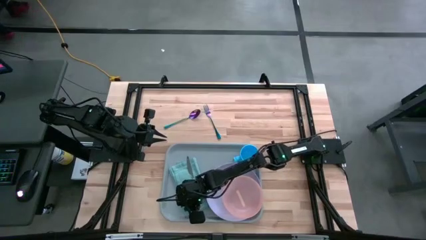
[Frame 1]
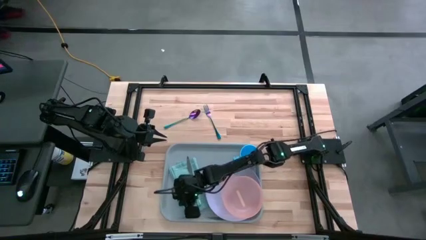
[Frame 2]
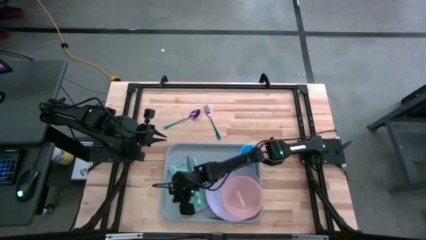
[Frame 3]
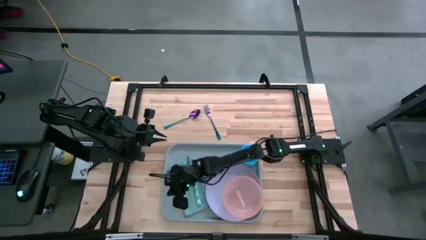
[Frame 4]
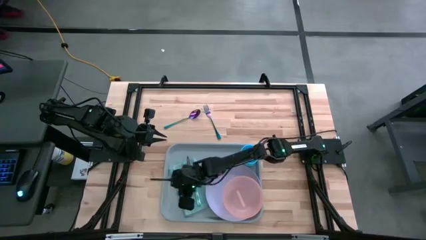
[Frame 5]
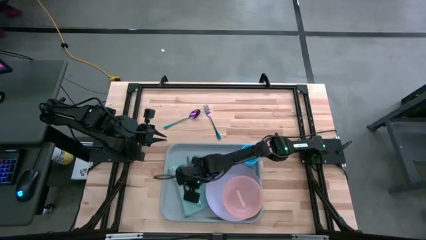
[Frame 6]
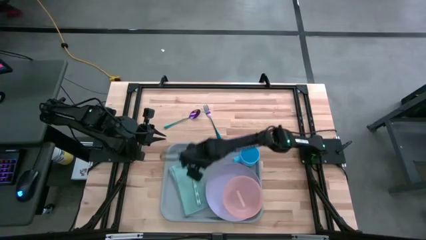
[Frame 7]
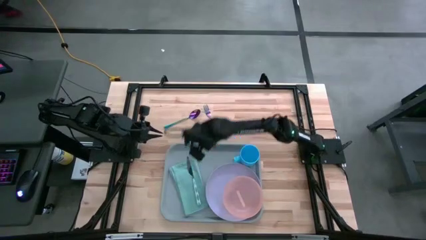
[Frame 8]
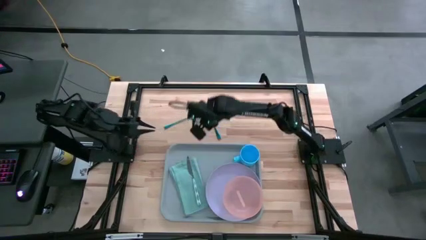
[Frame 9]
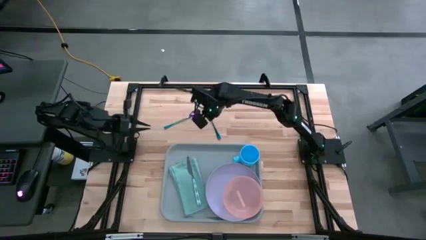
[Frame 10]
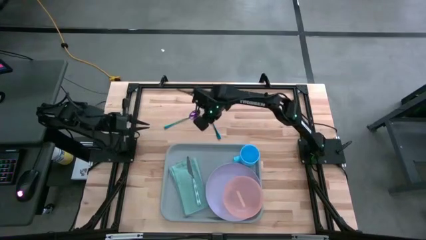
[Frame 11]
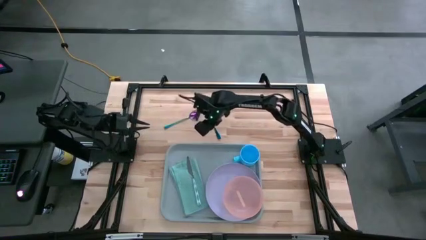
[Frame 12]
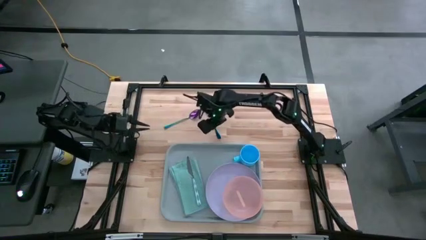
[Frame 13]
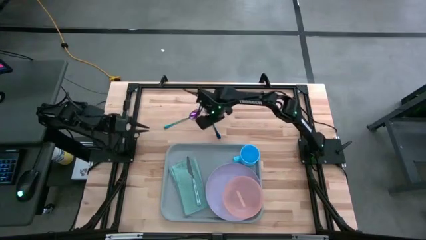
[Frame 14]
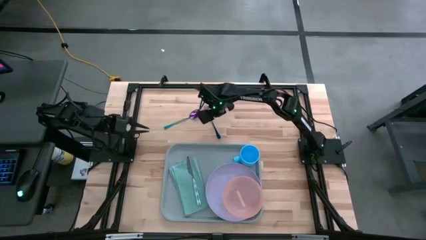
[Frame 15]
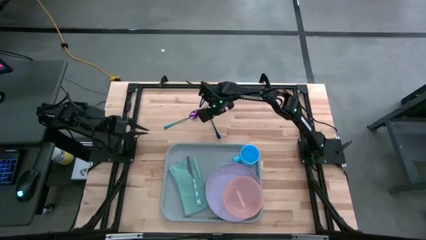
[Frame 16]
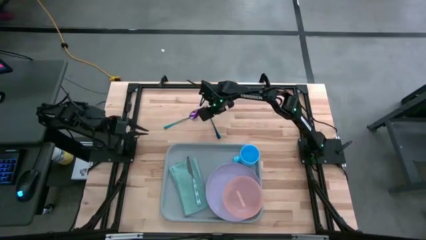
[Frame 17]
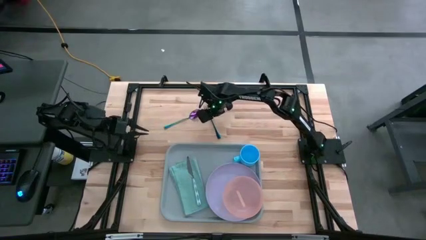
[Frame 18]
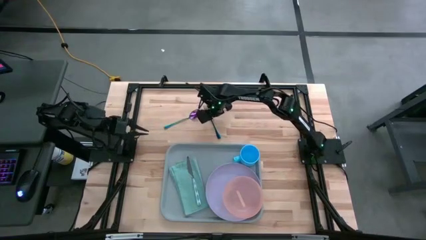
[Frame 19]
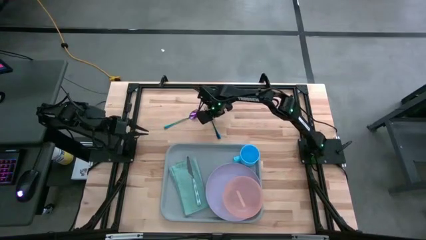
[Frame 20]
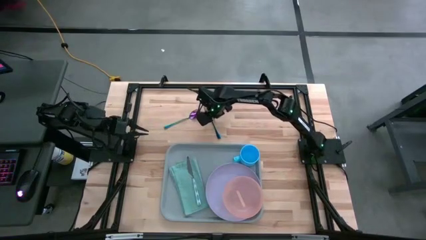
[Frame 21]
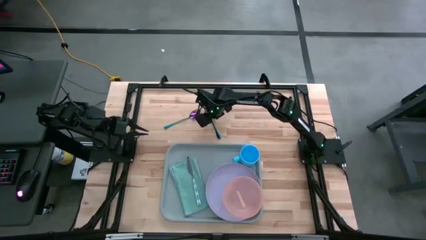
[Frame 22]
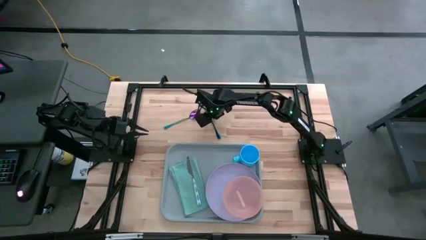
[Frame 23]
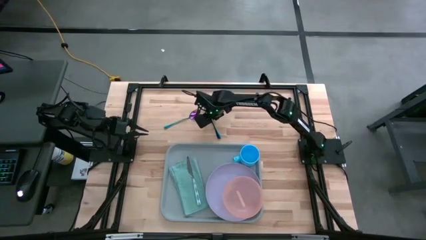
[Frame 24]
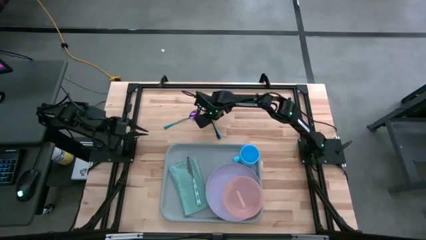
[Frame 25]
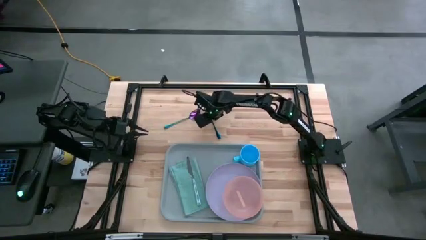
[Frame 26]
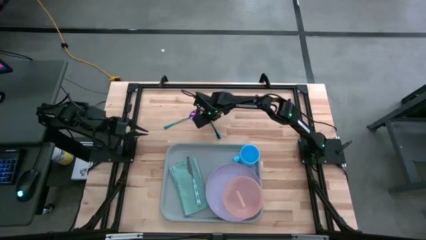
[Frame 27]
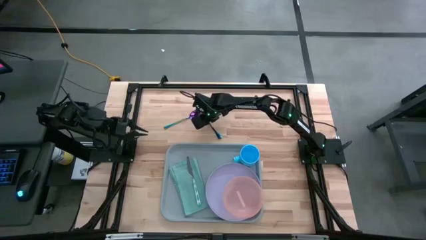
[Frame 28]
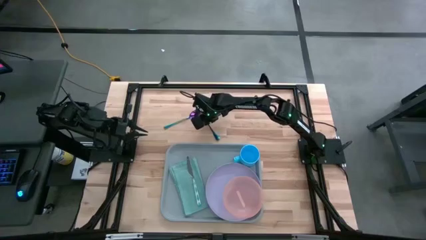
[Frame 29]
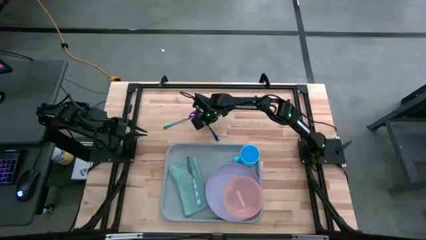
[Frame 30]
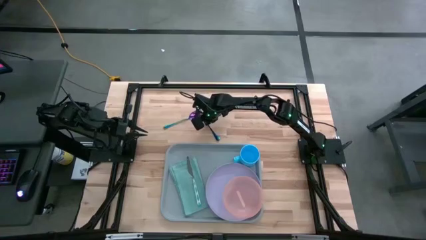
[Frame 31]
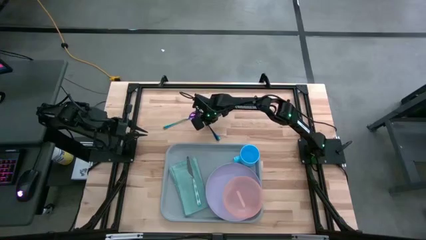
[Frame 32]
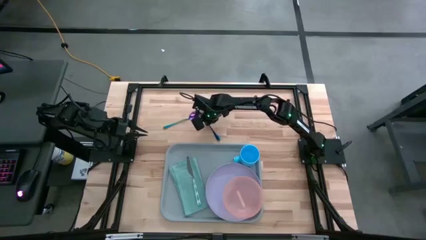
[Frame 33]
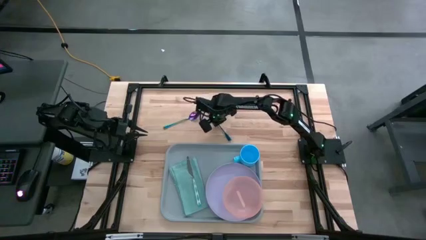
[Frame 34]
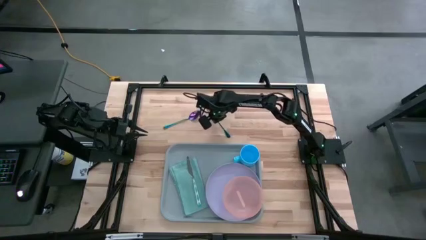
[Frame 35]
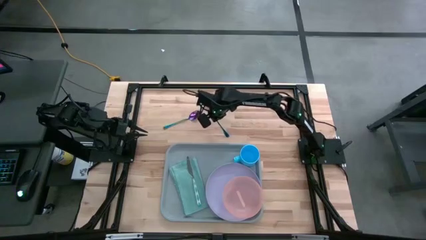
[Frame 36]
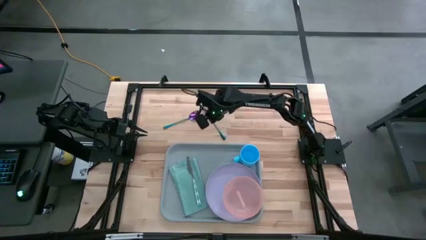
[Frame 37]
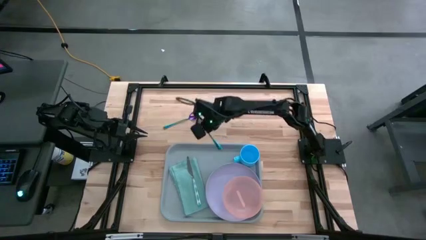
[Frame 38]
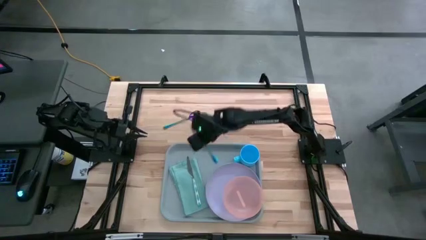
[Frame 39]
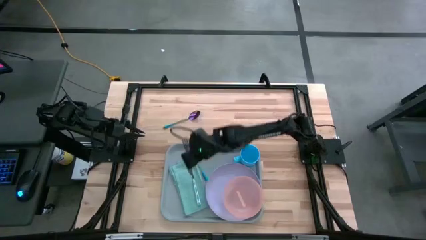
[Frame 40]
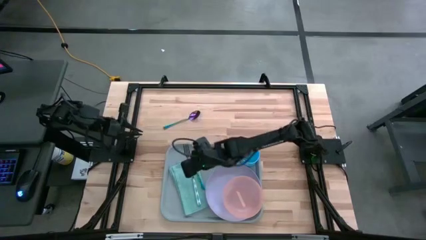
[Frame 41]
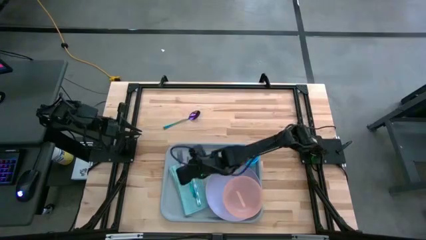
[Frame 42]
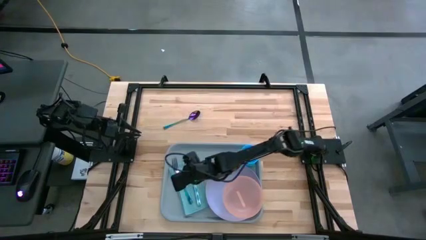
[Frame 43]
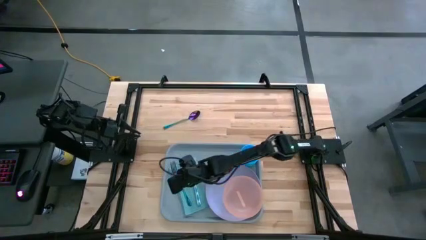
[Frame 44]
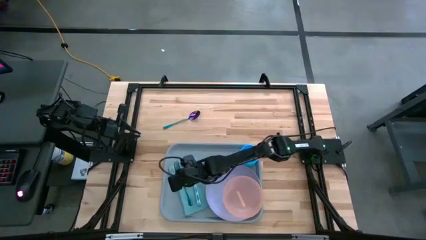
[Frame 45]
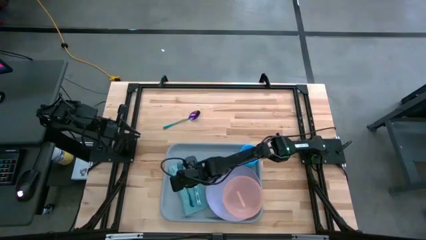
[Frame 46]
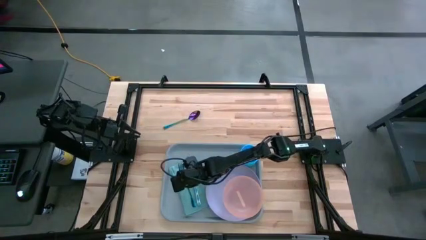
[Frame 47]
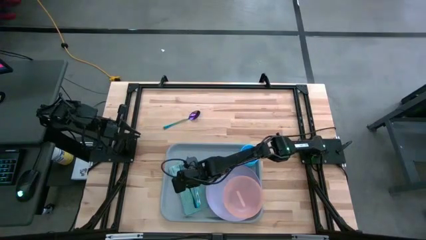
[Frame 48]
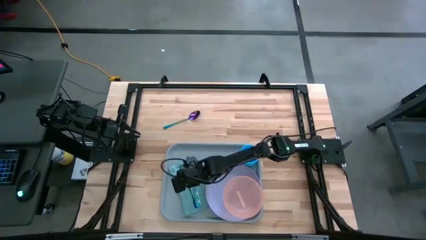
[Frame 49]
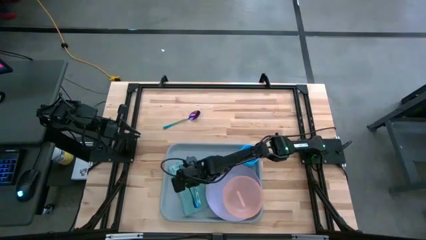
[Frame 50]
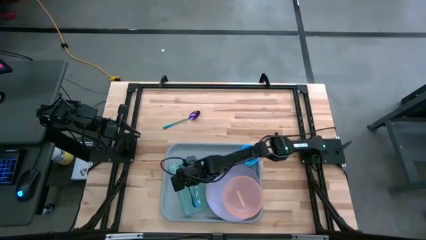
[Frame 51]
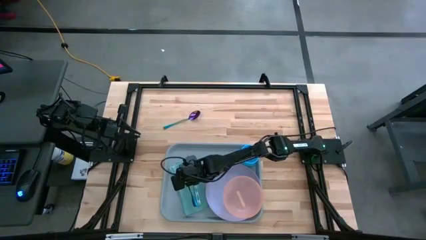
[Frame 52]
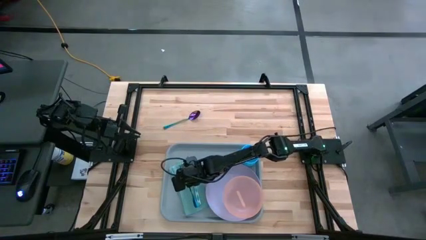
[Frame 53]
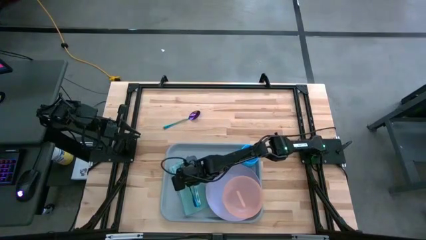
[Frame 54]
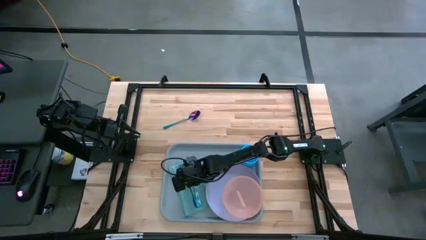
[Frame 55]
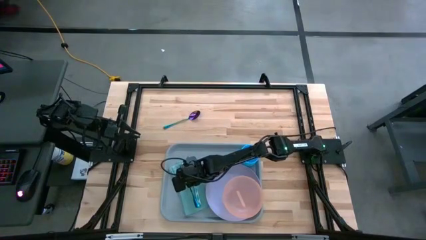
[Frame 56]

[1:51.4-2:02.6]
Task: Set up tray
Put the purple fork on top of the blue napkin to the left of the green and white knife

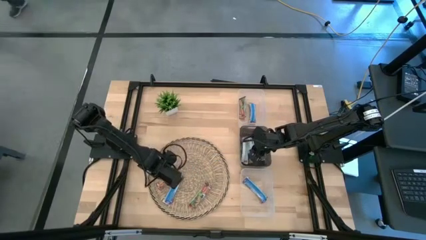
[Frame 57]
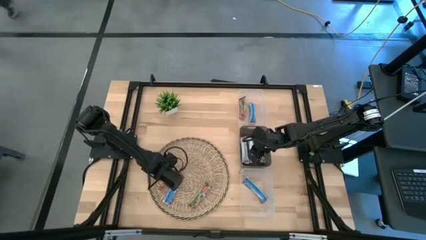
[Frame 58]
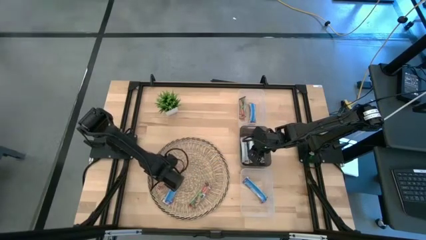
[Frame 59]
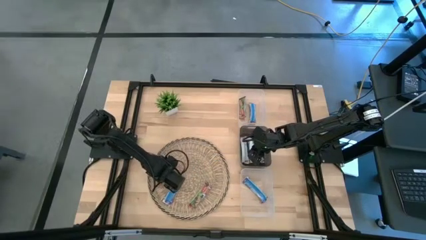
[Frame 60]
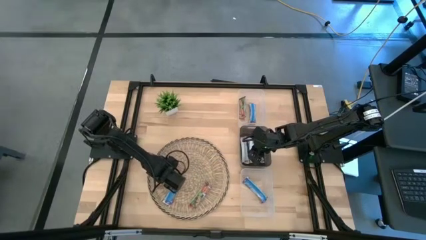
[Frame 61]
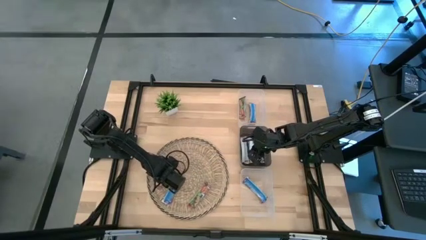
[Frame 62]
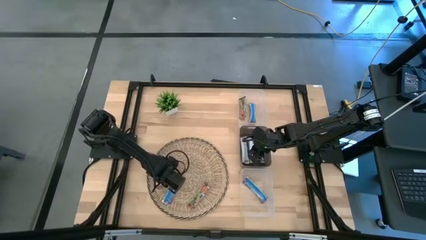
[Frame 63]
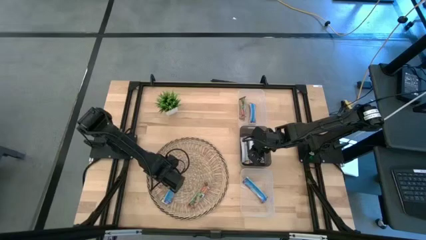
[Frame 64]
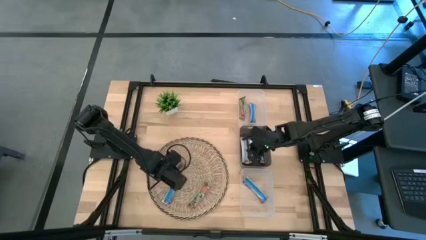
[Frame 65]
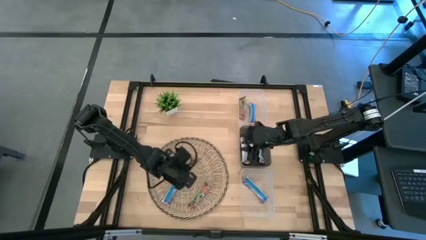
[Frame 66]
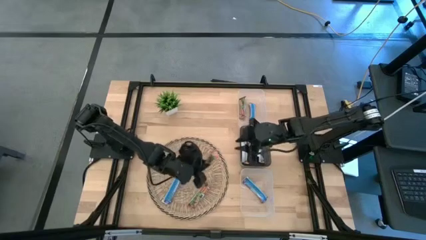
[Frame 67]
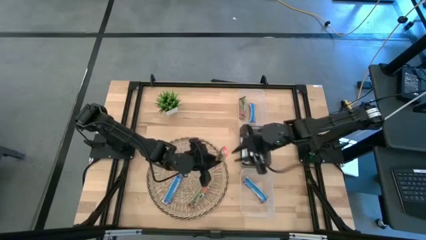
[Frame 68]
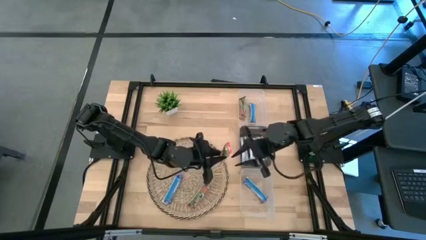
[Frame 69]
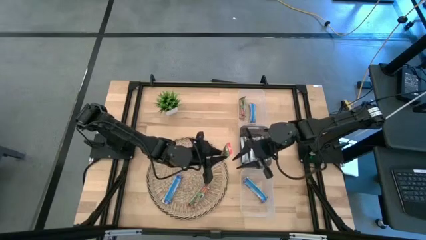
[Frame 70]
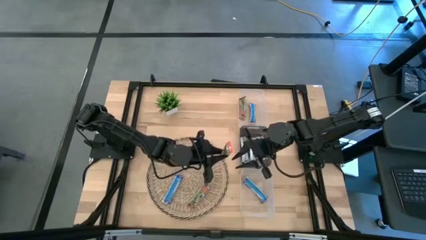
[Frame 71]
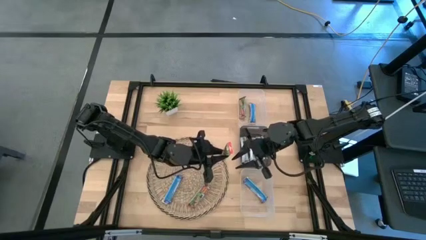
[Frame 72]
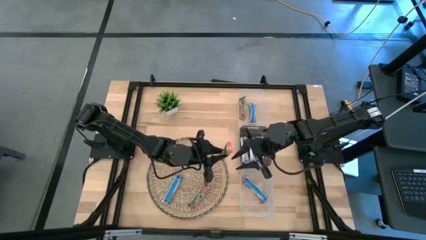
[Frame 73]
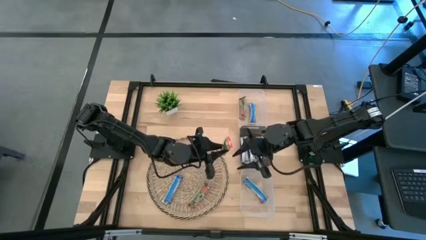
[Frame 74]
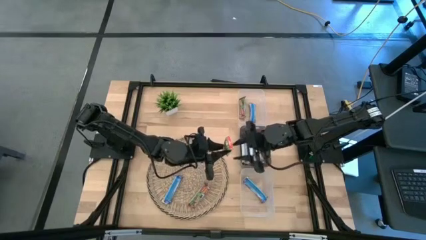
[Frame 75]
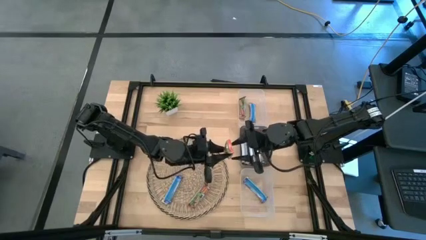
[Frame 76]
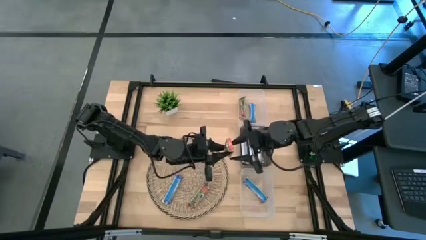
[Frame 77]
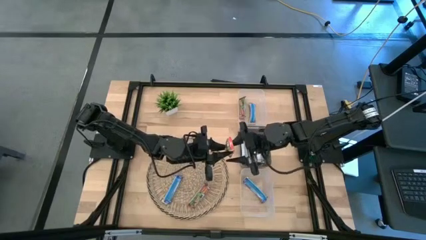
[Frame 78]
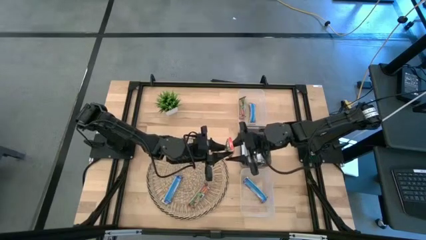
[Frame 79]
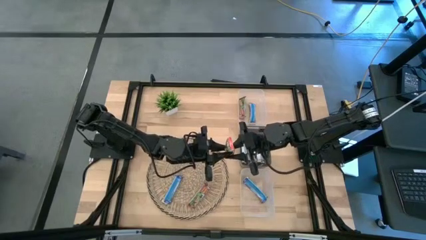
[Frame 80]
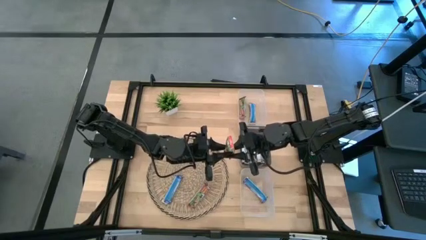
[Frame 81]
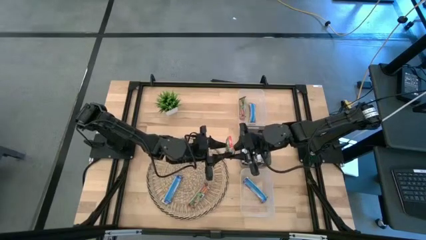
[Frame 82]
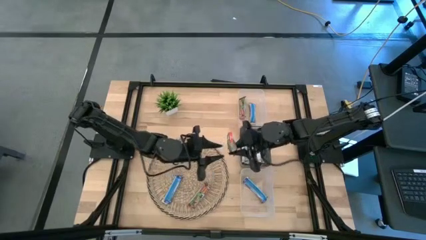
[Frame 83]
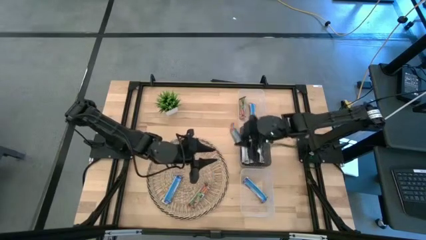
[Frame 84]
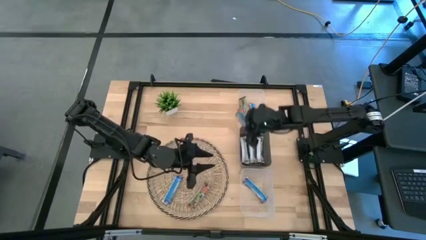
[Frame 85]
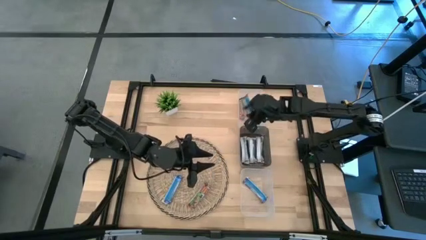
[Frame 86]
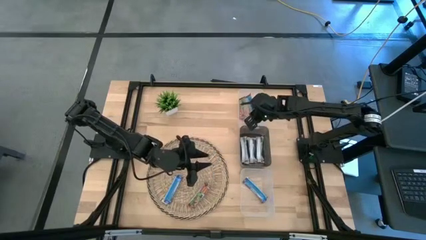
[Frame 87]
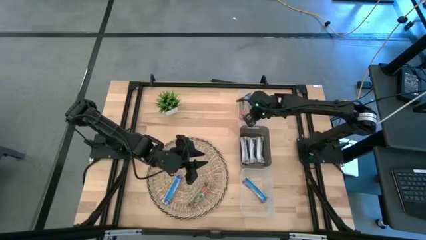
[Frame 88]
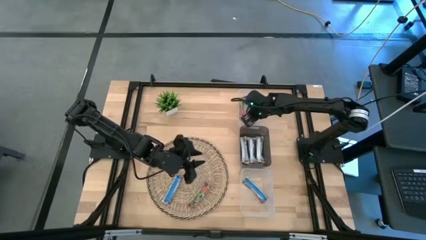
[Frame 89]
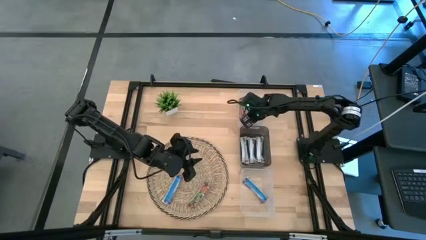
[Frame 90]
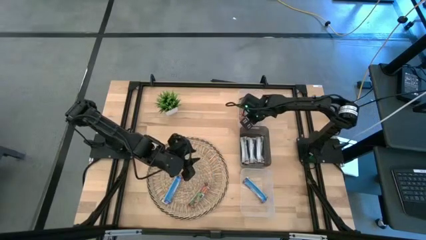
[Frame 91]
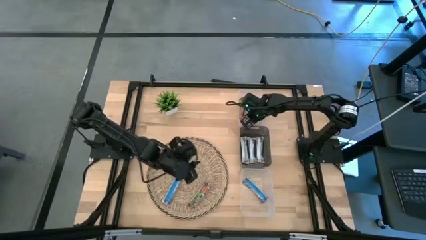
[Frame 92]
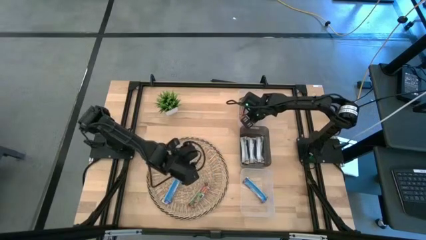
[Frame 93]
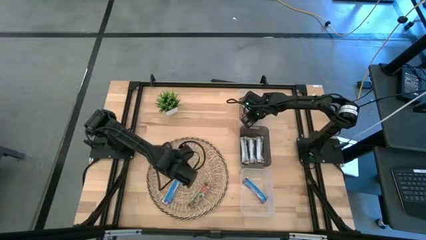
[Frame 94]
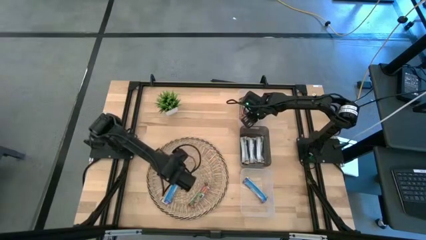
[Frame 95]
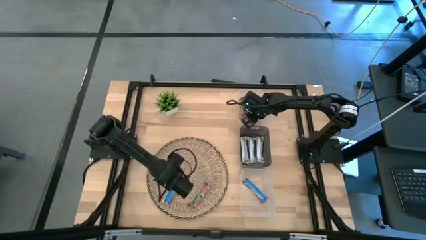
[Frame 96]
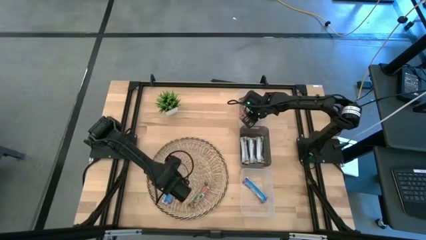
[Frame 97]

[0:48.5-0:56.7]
Task: Pick and place Granola Bars by type
Put the red granola bar into the top transparent bin
